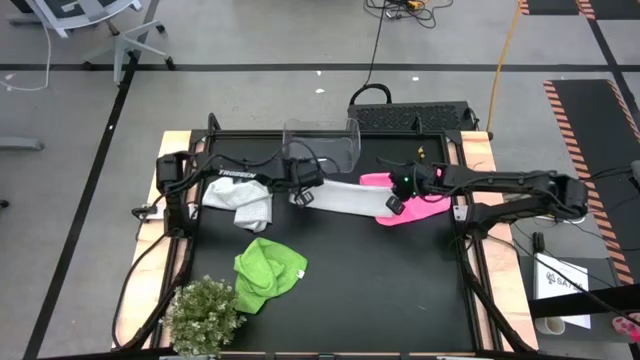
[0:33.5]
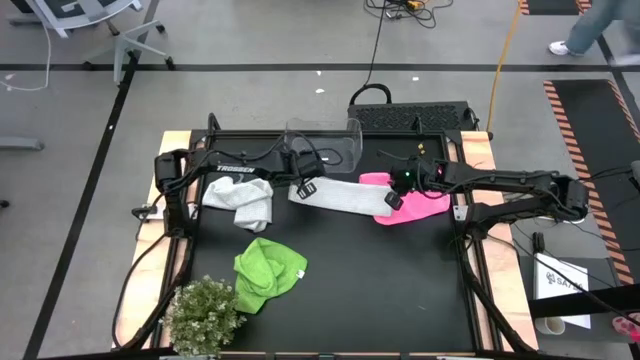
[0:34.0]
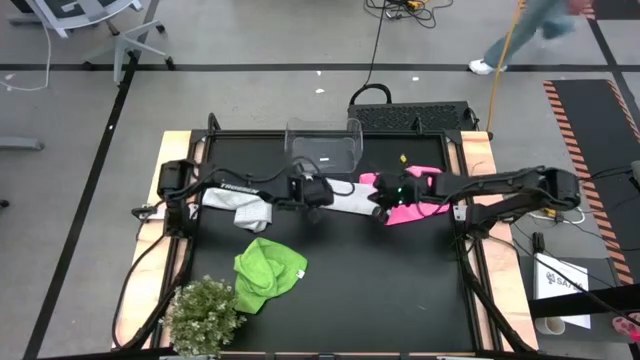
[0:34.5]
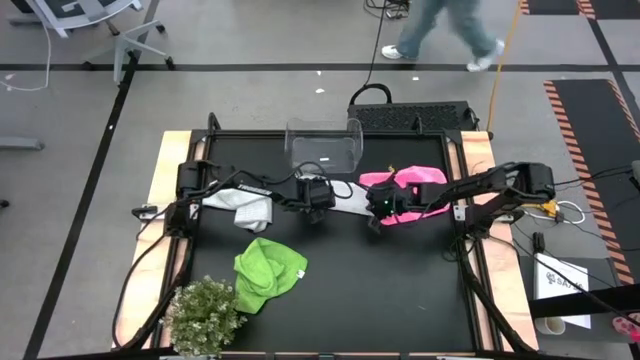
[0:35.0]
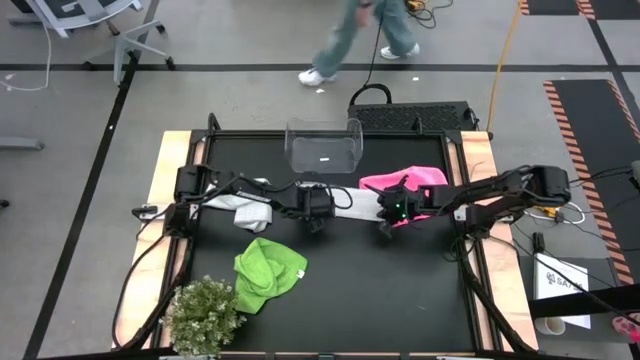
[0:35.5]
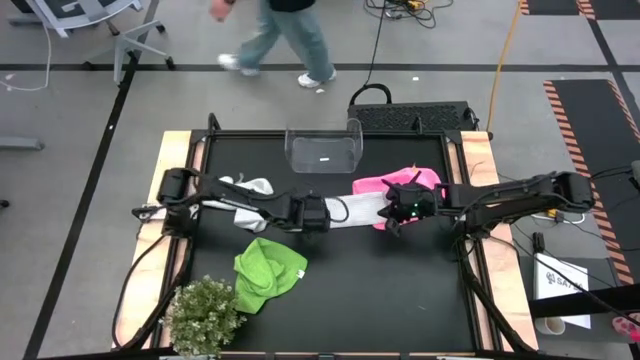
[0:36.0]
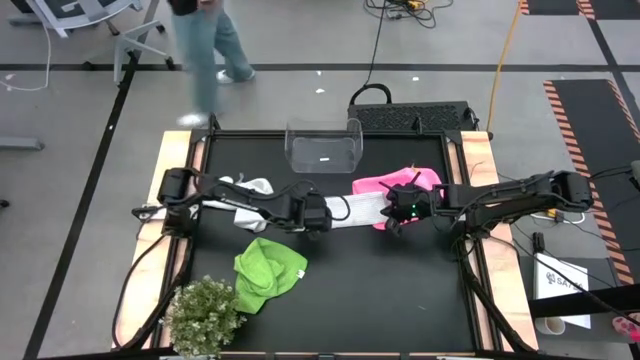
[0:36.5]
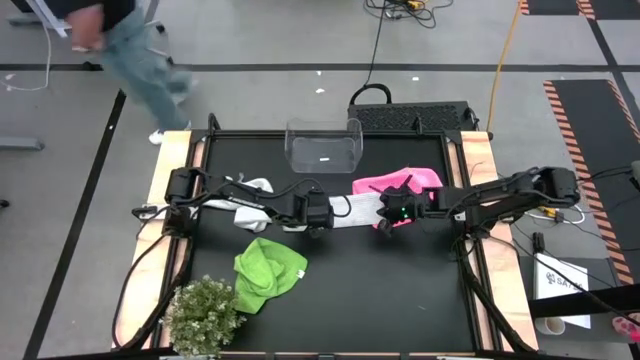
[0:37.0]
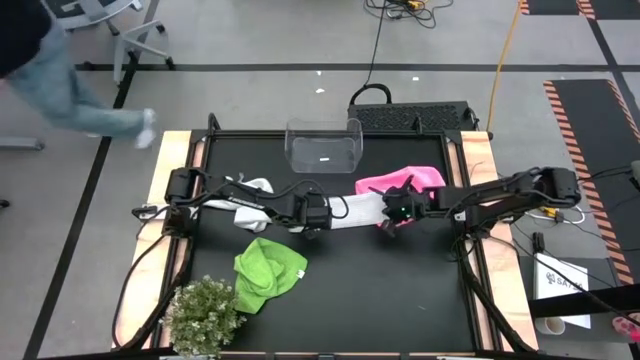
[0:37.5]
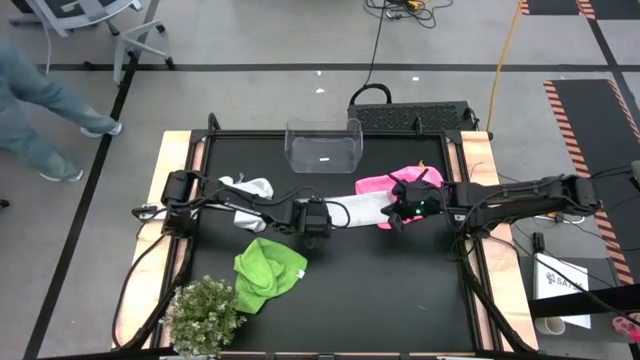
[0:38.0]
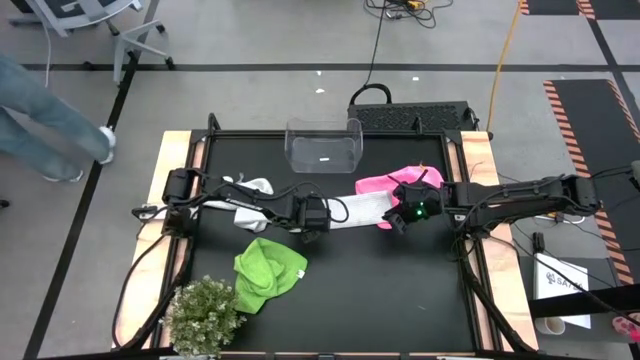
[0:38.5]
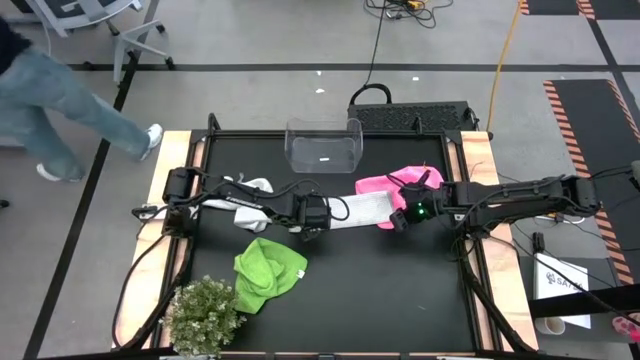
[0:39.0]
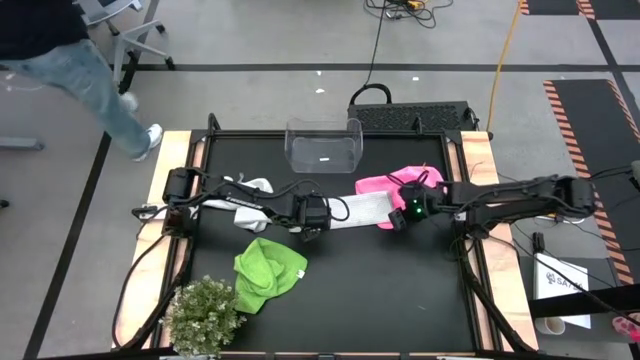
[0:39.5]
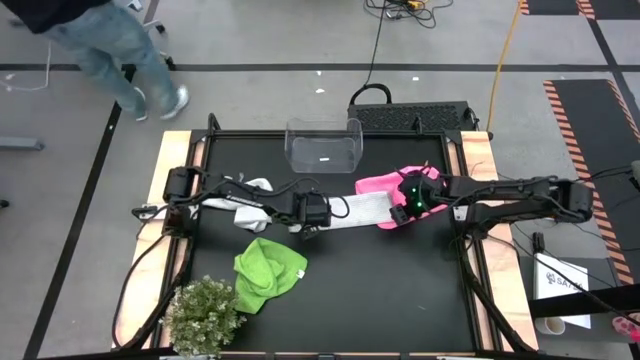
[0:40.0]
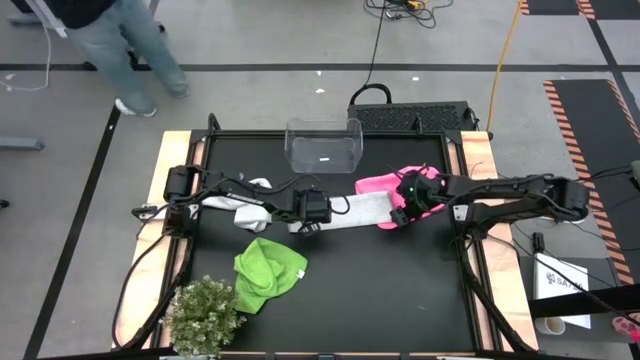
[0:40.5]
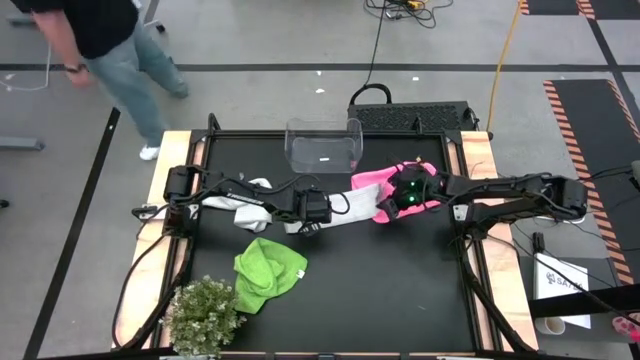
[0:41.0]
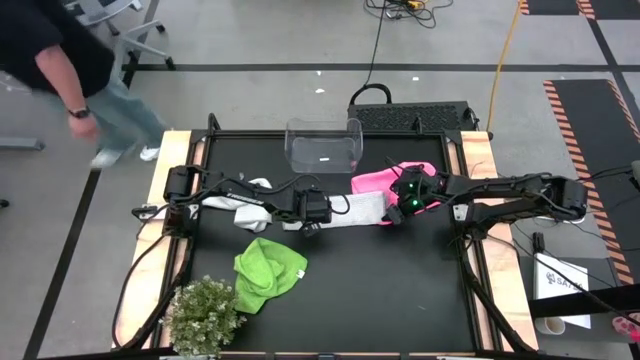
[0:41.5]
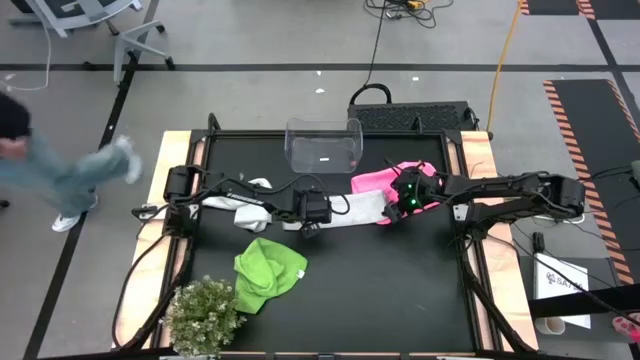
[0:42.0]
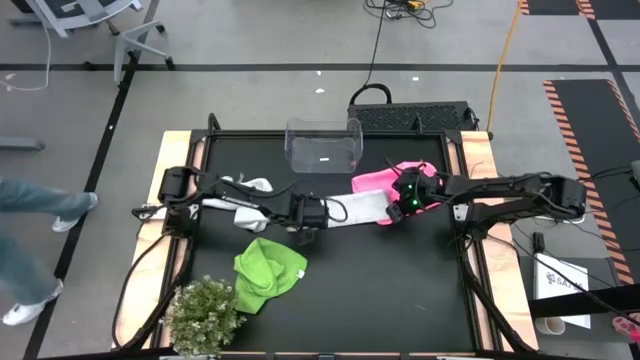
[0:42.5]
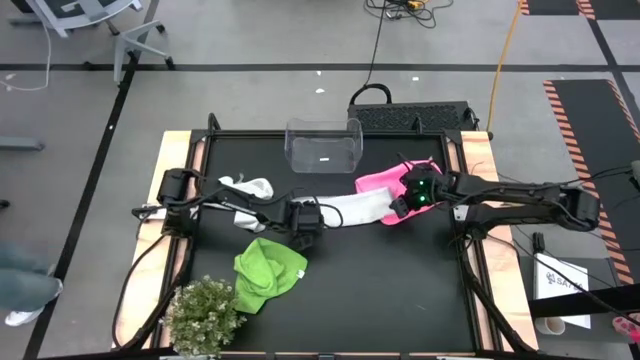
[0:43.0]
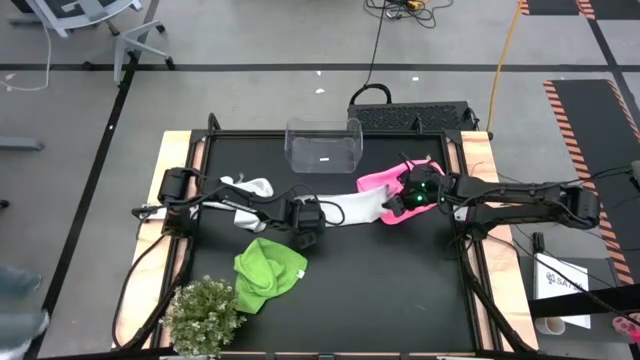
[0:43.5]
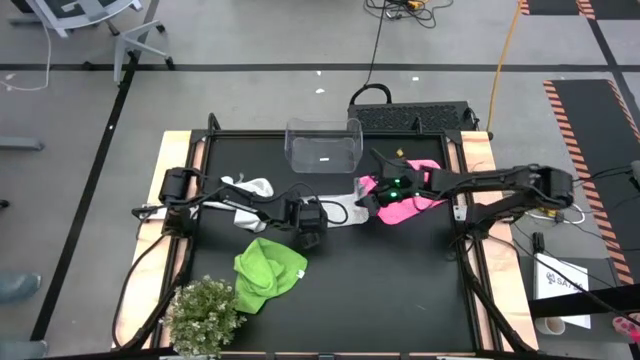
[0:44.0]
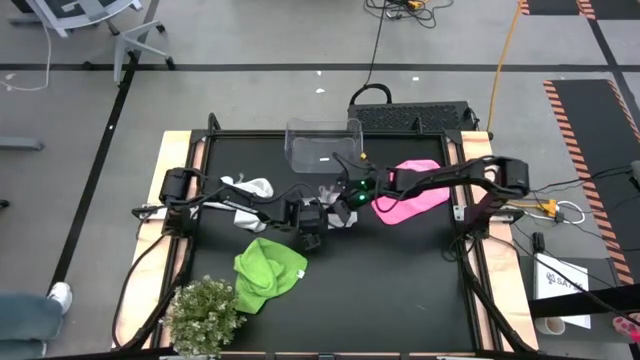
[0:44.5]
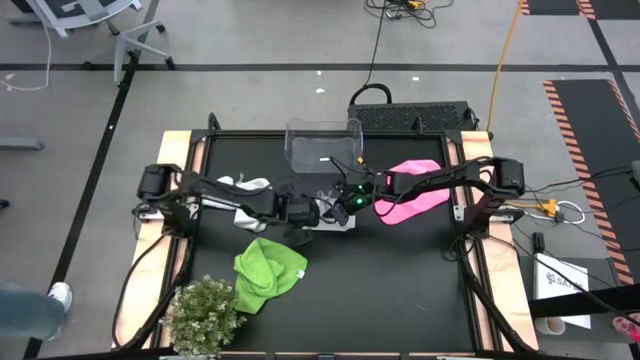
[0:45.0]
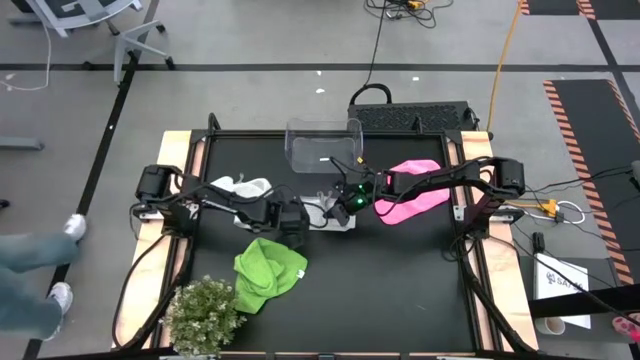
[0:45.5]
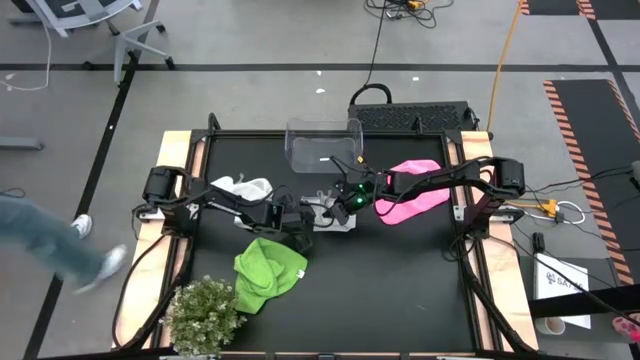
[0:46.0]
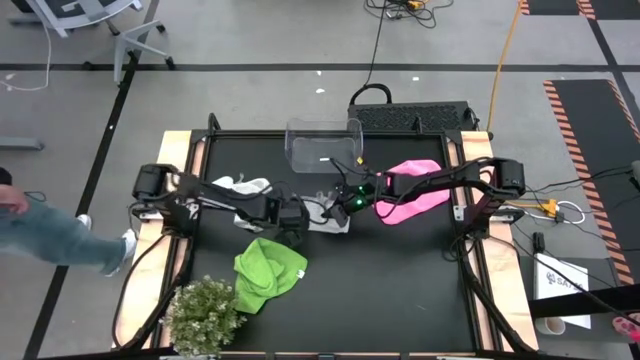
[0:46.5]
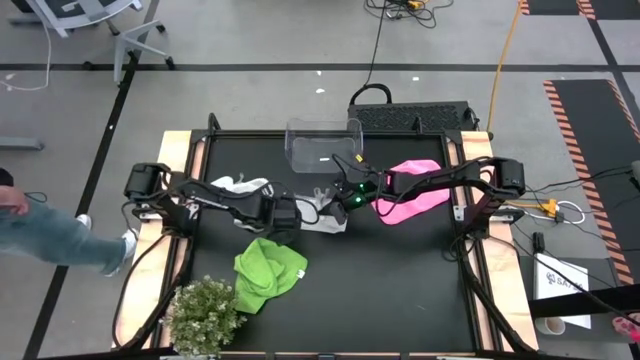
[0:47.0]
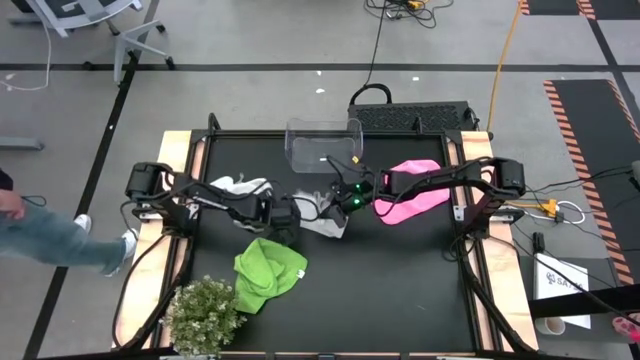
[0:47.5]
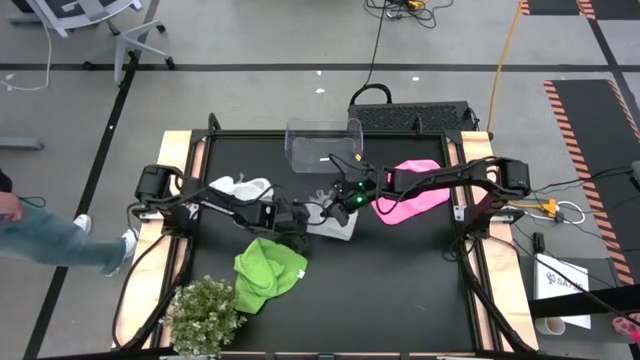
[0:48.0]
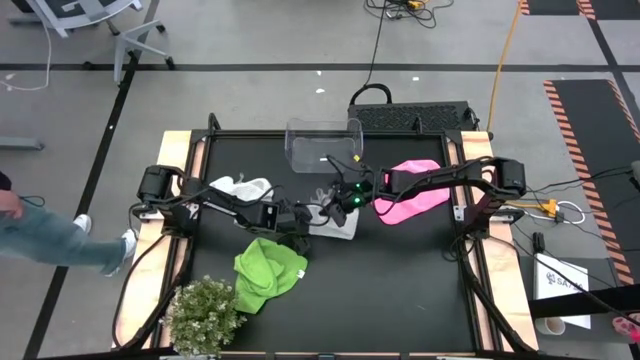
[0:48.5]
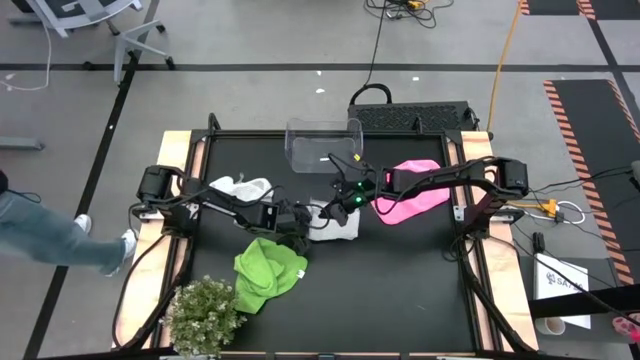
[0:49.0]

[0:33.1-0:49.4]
Task: Fold microfiber towels
Fold the right gray microfiber cloth

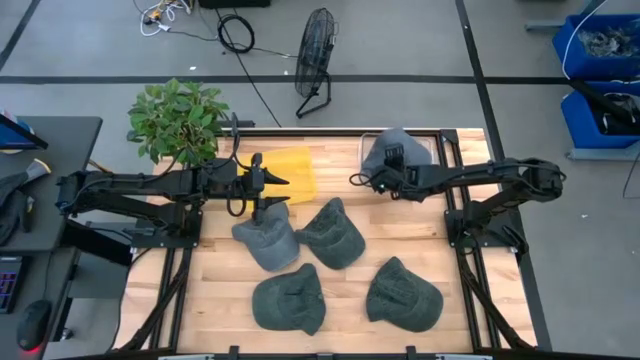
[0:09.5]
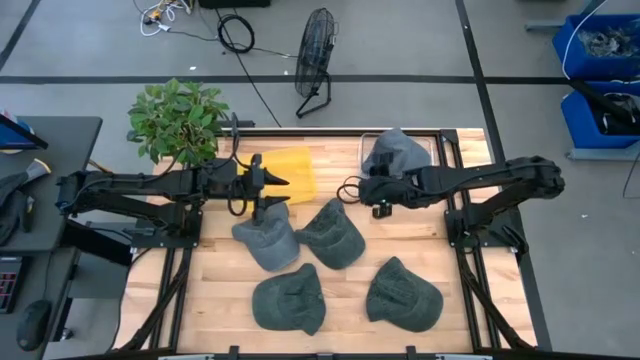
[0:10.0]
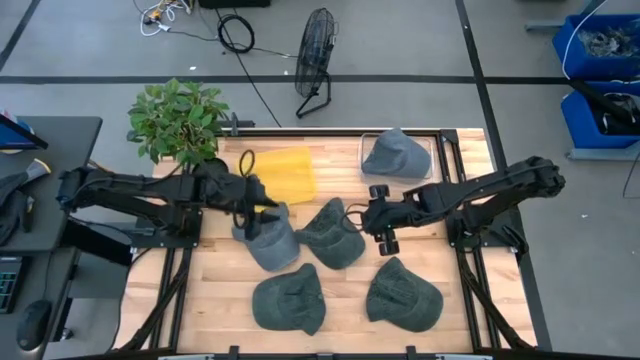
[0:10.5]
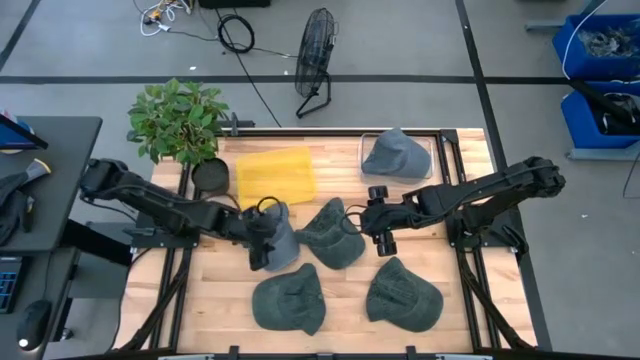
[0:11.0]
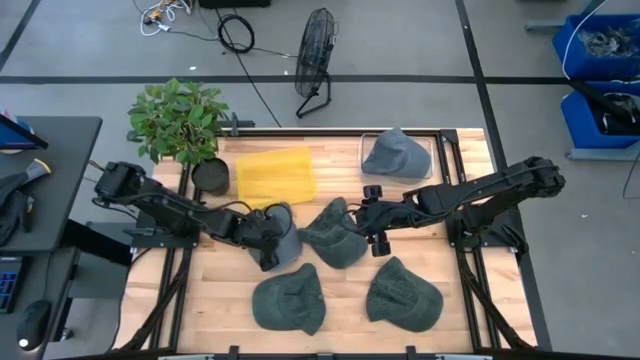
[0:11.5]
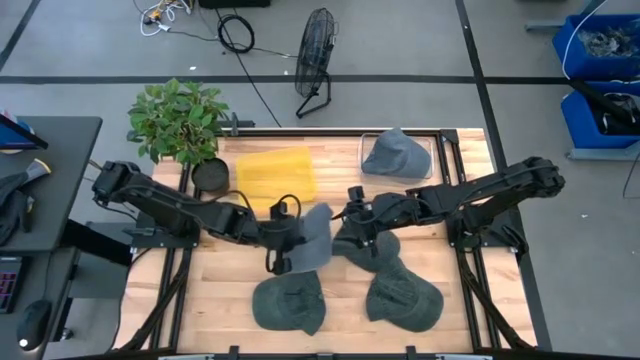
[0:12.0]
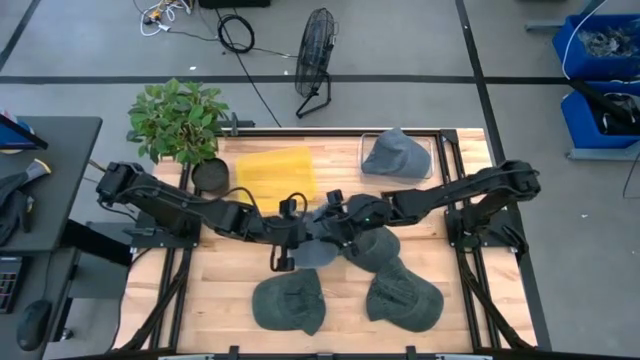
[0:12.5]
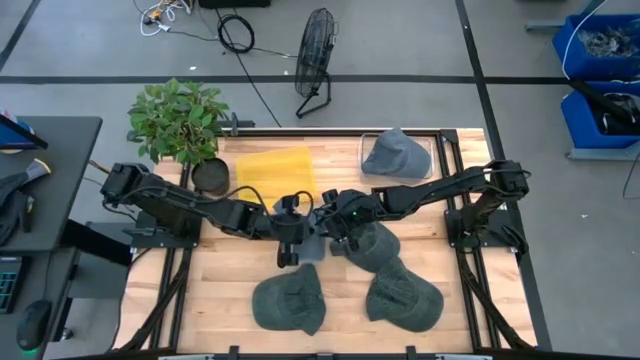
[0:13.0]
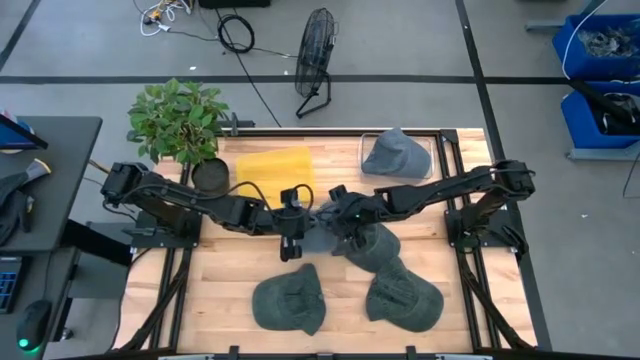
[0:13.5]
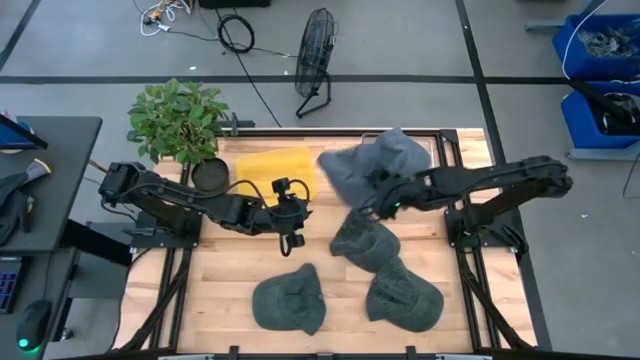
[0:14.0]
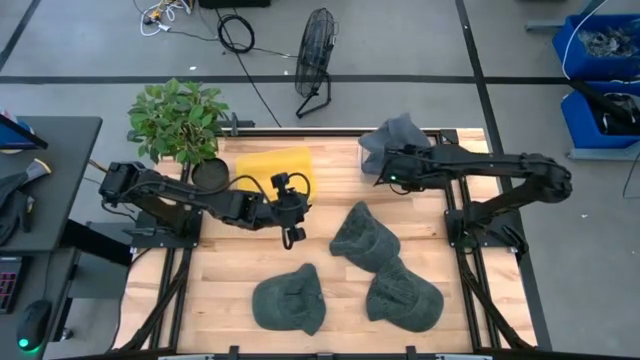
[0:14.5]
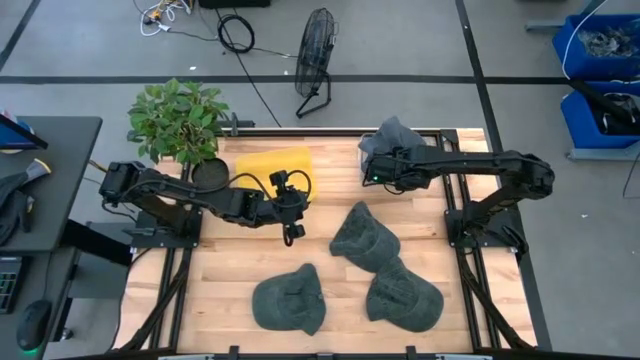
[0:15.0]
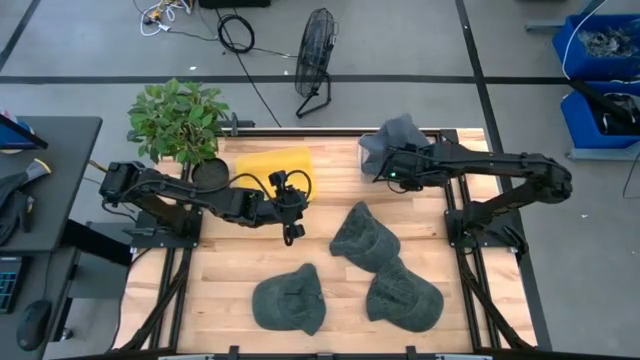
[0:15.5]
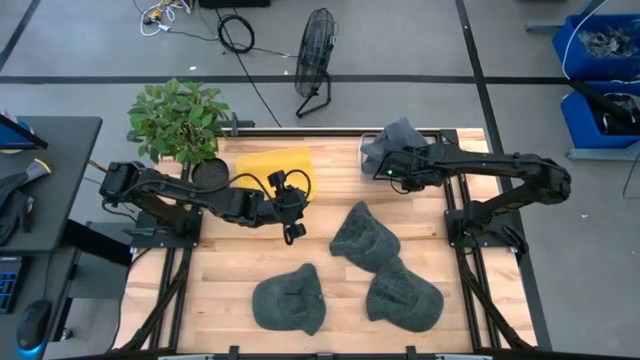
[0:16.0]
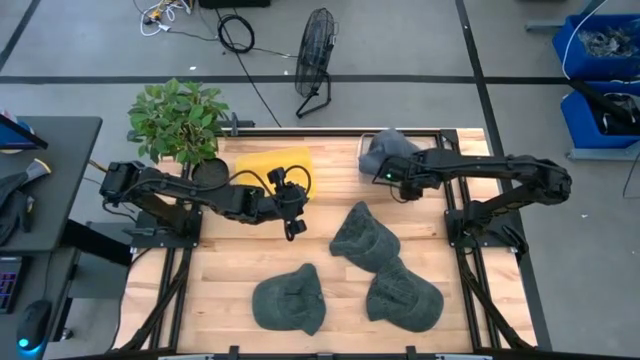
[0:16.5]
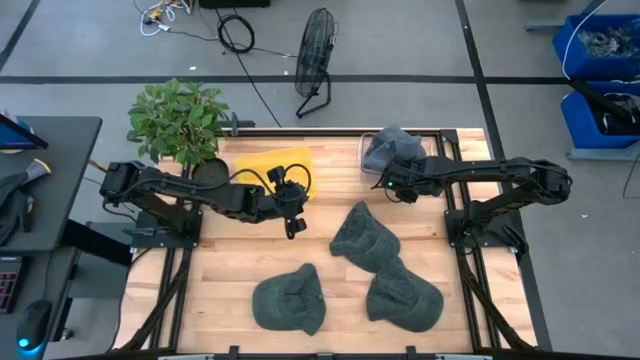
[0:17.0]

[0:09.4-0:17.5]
Task: Pick & Place hat
Put the gray cap into the transparent bin
